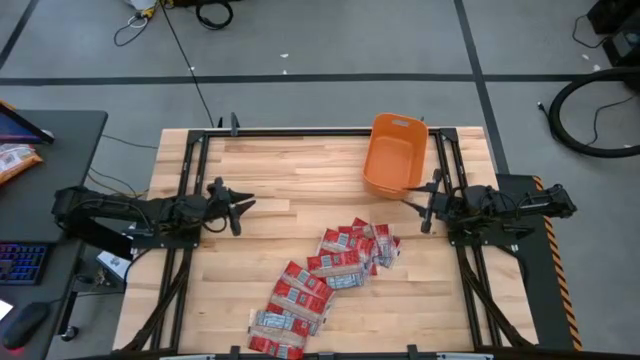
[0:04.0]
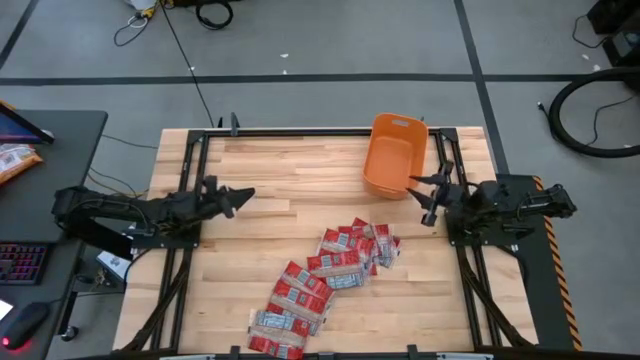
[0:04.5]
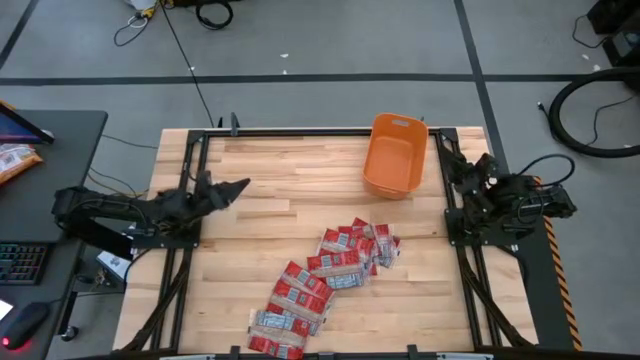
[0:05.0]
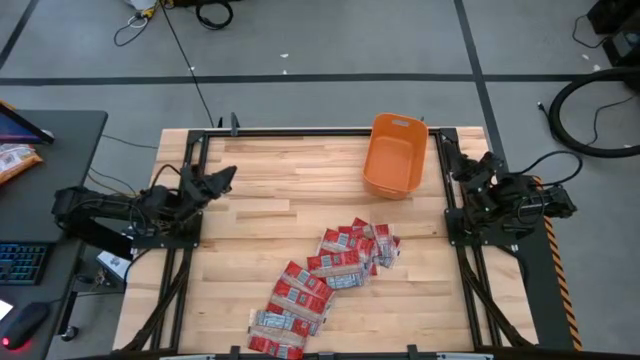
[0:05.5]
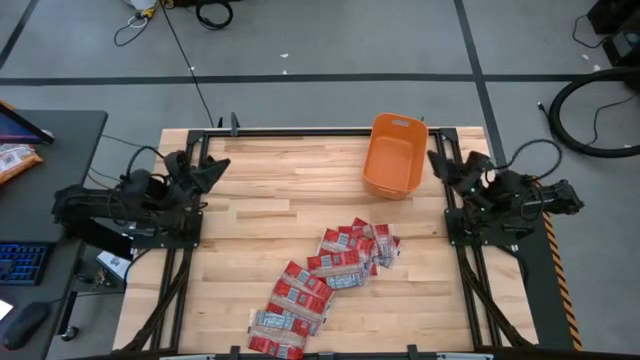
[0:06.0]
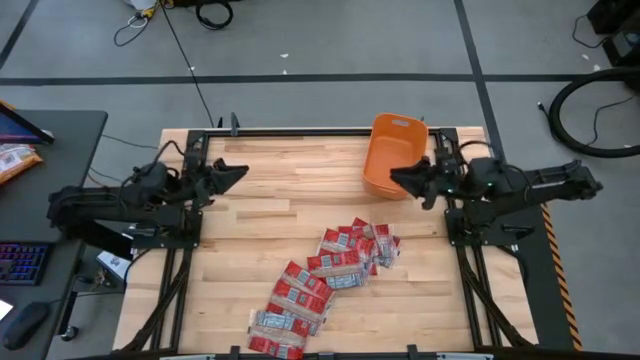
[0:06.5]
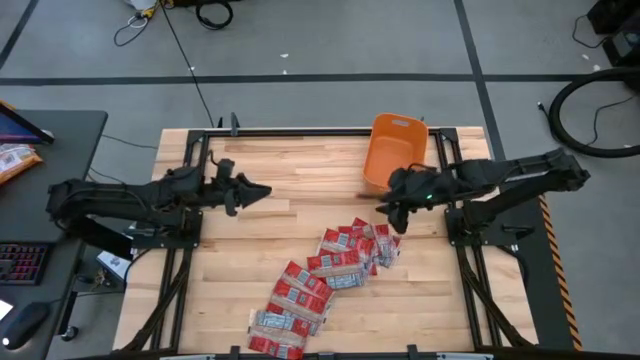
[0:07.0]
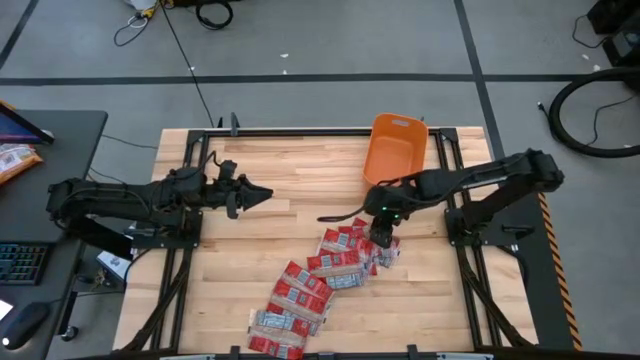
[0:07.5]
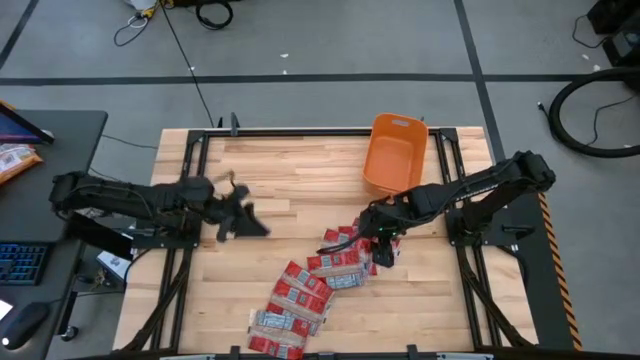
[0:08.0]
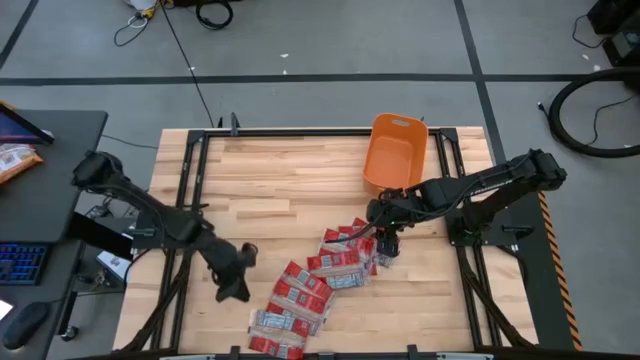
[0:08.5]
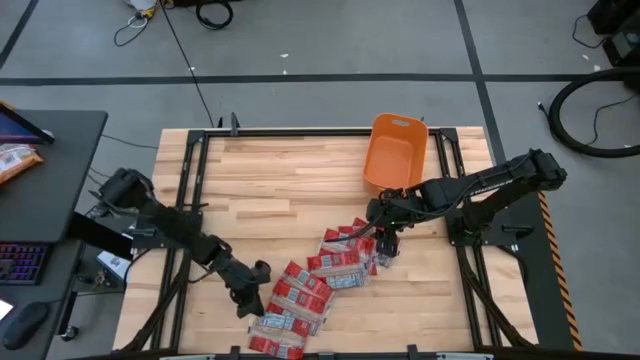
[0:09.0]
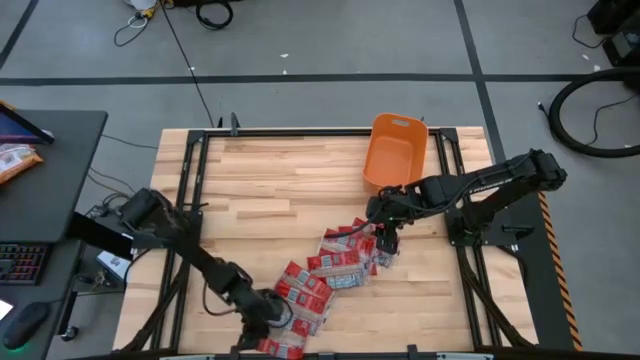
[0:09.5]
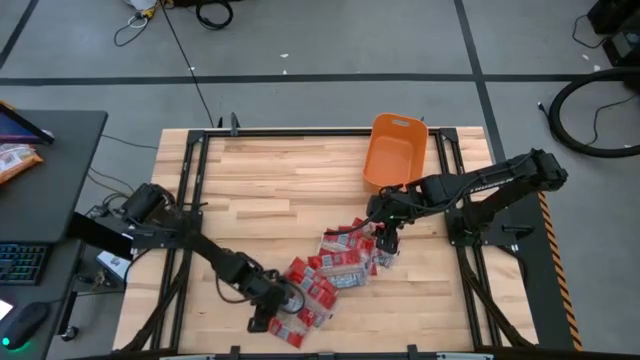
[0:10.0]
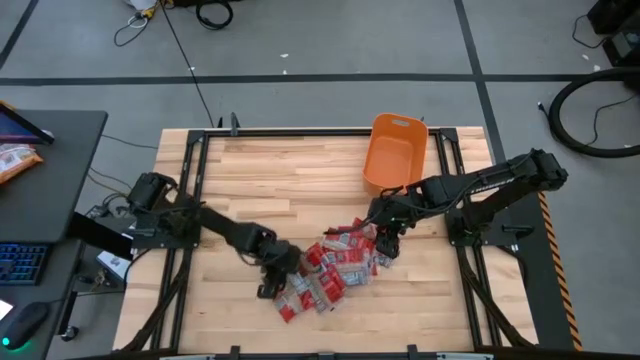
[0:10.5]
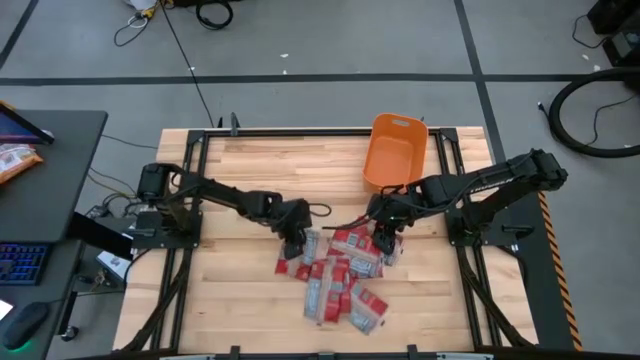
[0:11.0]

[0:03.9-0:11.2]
Task: Sort popcorn bags into baskets
Adjust the red popcorn bags on the table

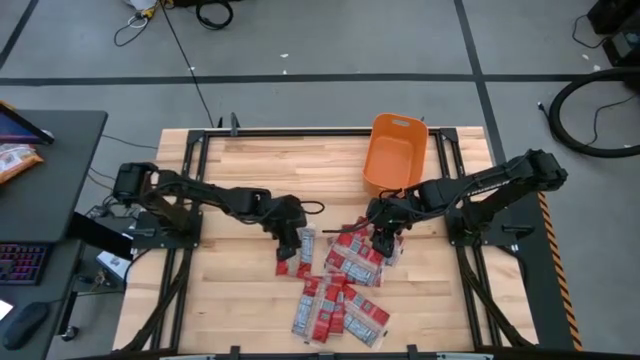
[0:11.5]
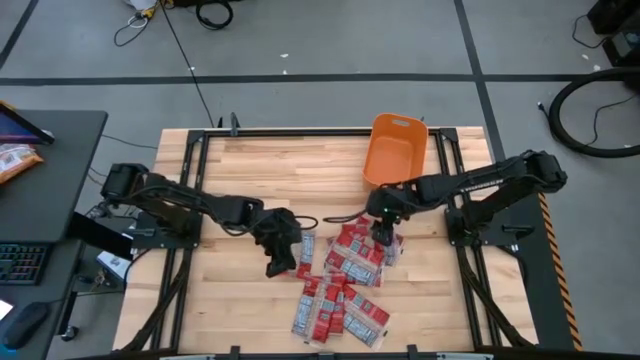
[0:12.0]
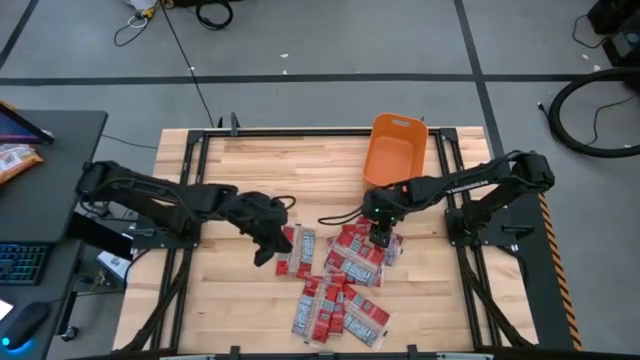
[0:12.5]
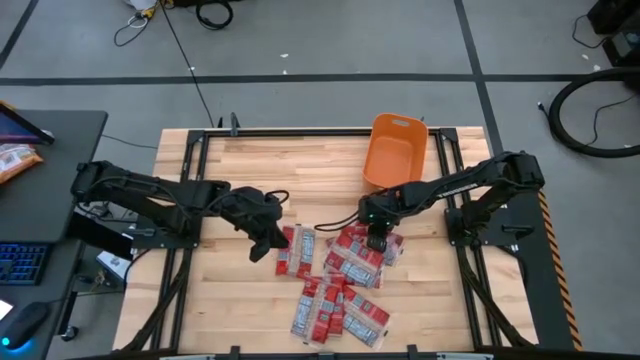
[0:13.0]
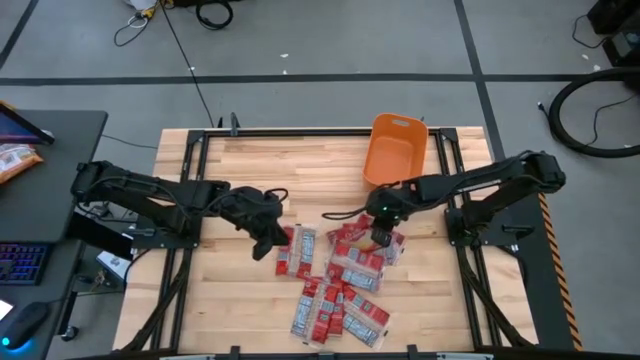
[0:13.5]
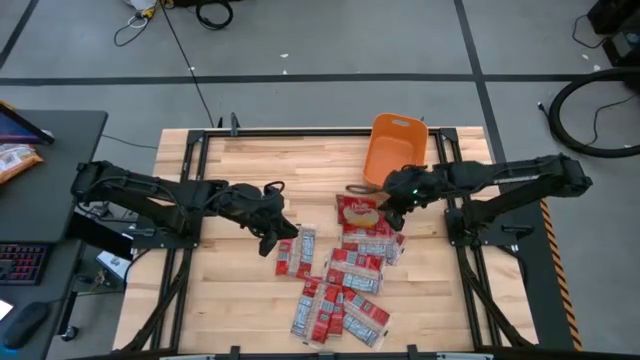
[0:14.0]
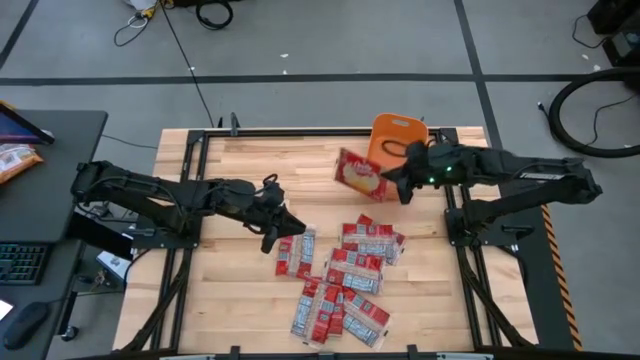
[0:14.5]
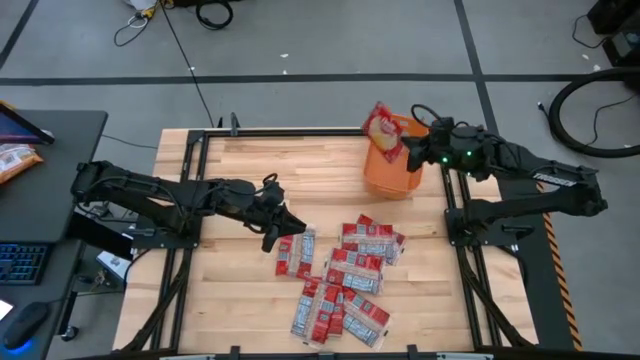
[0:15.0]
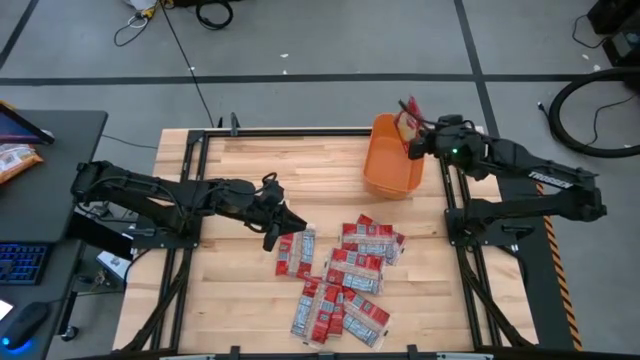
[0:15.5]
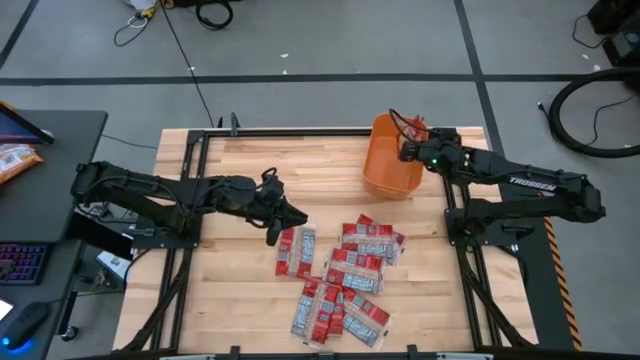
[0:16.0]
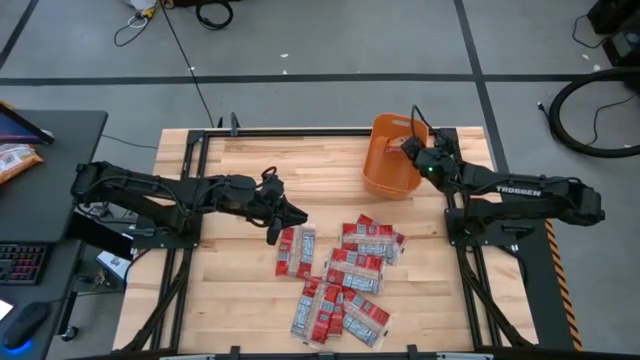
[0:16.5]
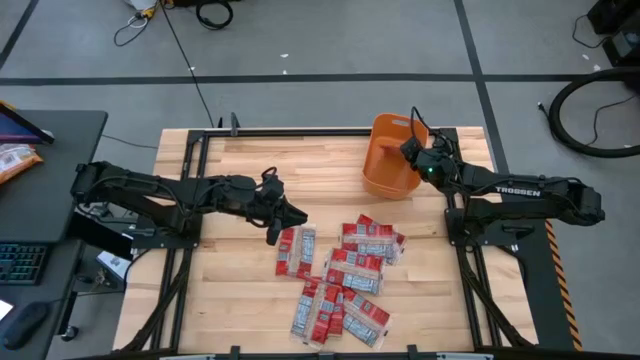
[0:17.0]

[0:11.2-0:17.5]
Put the red popcorn bag into the orange bin

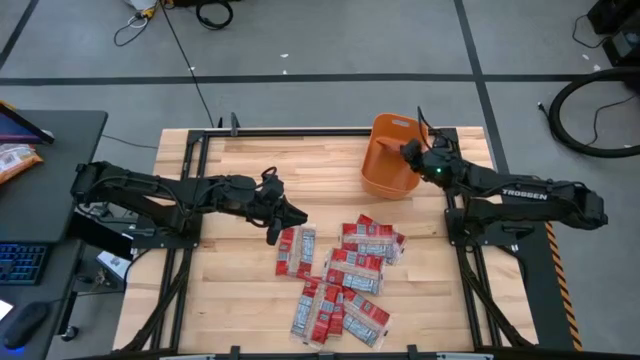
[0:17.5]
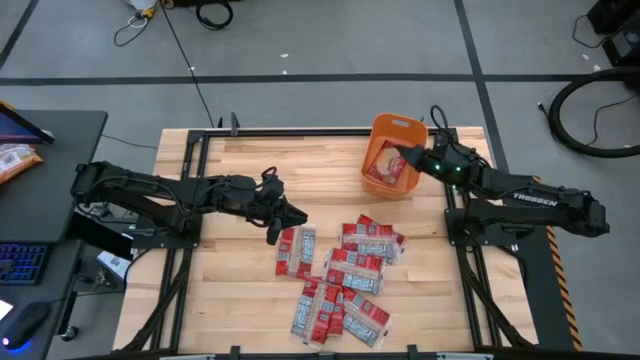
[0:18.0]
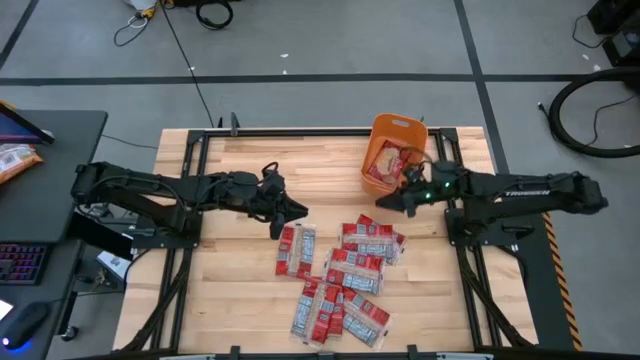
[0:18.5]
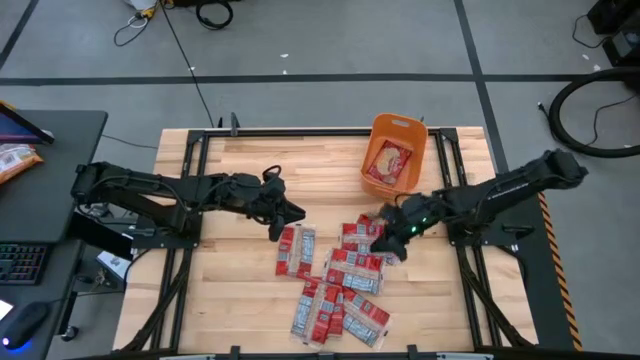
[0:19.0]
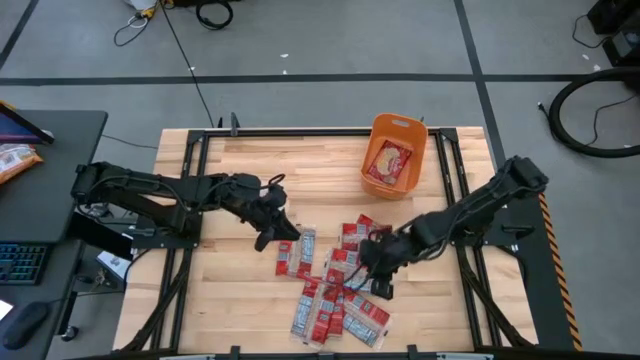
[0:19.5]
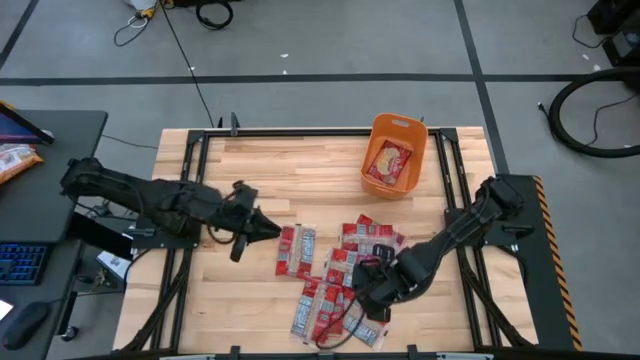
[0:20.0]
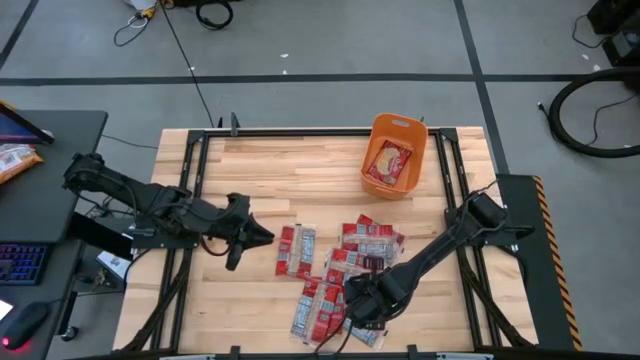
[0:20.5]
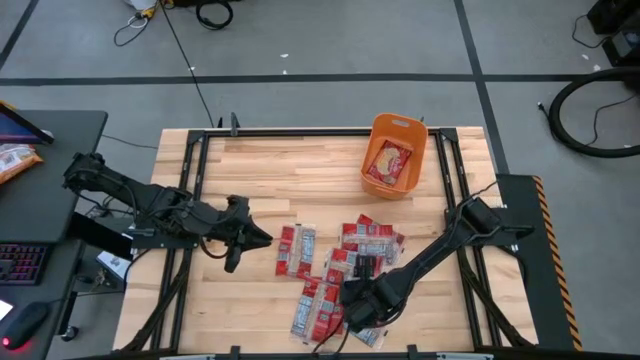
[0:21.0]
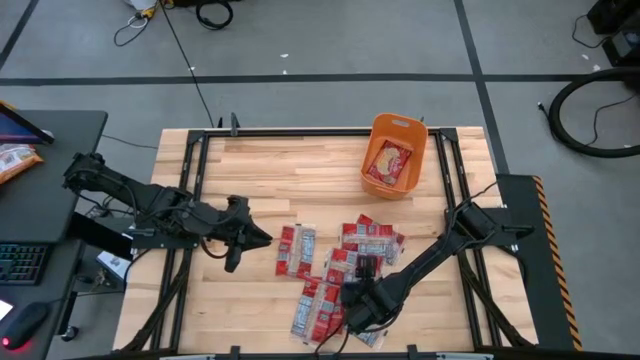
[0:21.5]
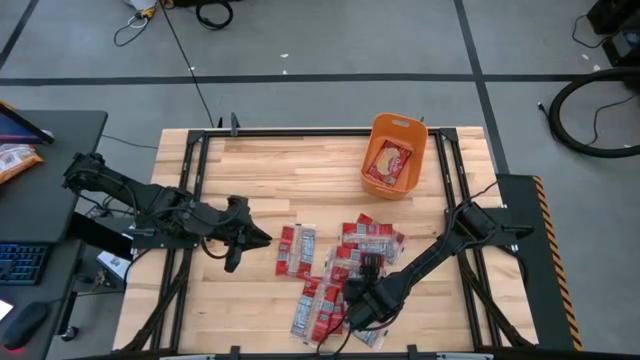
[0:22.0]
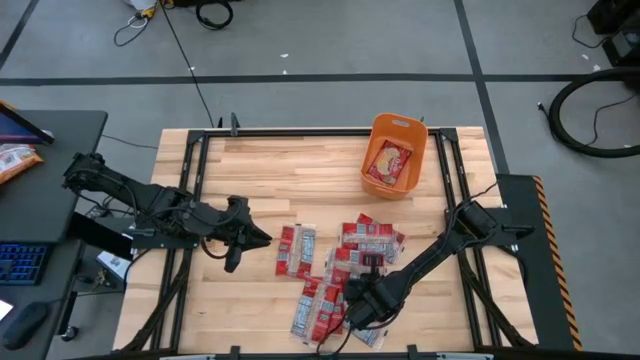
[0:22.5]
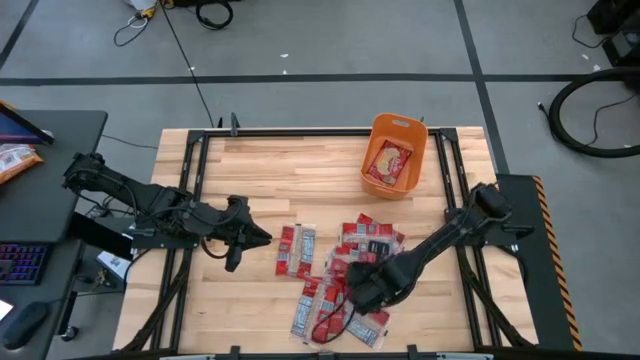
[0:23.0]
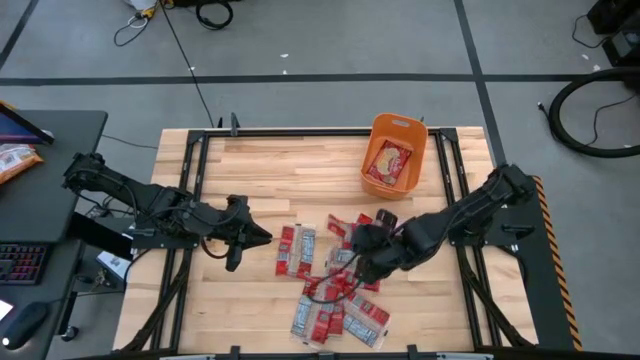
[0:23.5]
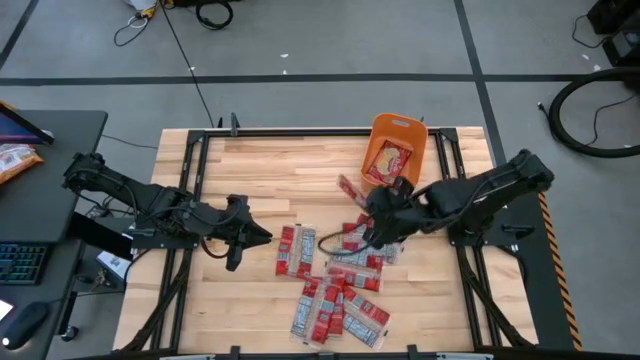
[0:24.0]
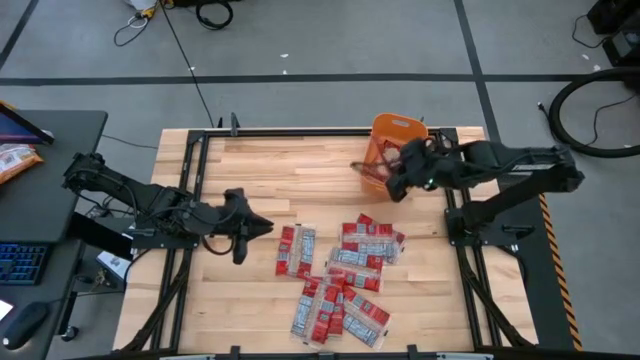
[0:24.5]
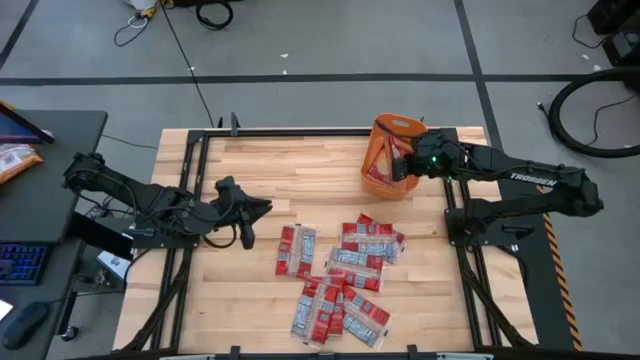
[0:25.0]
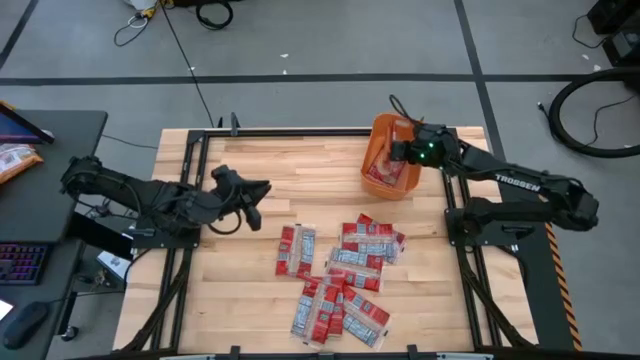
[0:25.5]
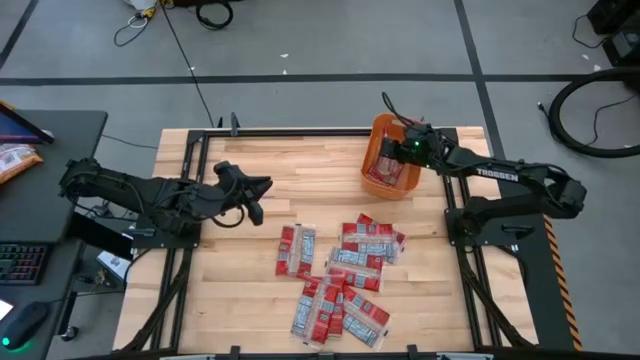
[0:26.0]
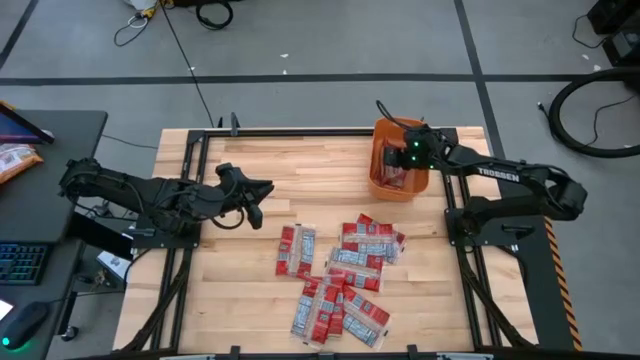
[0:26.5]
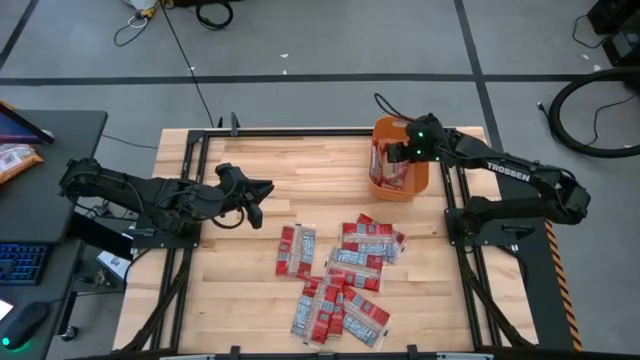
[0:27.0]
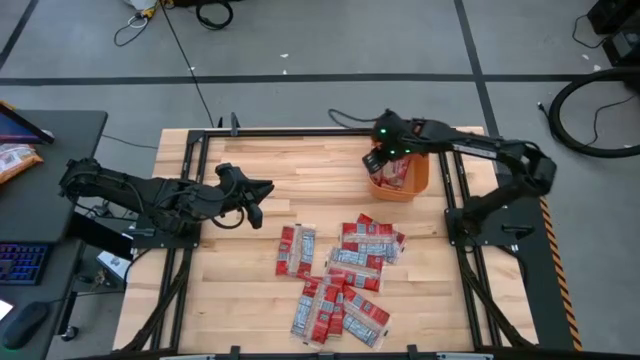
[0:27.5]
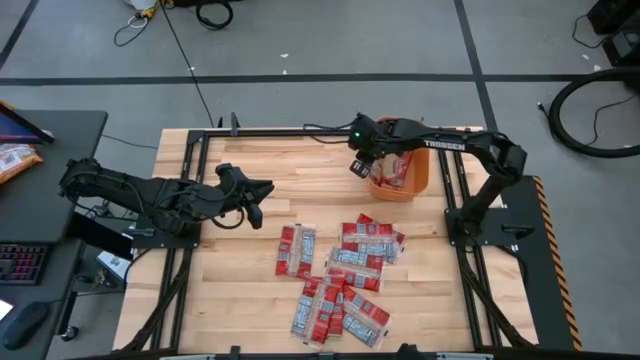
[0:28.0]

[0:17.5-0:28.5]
Put the red popcorn bag into the orange bin
